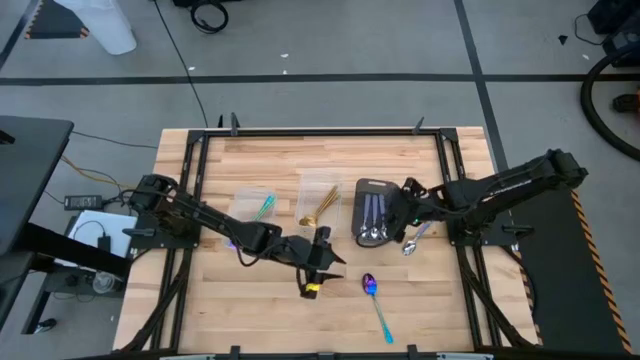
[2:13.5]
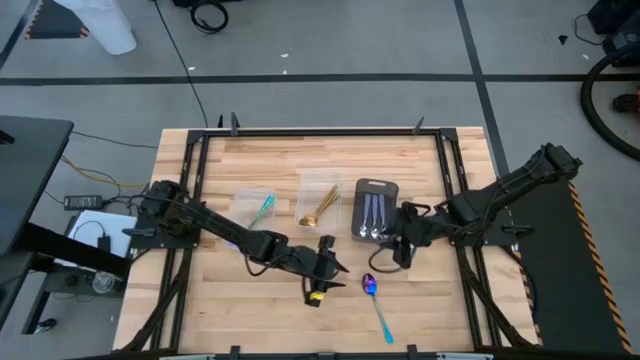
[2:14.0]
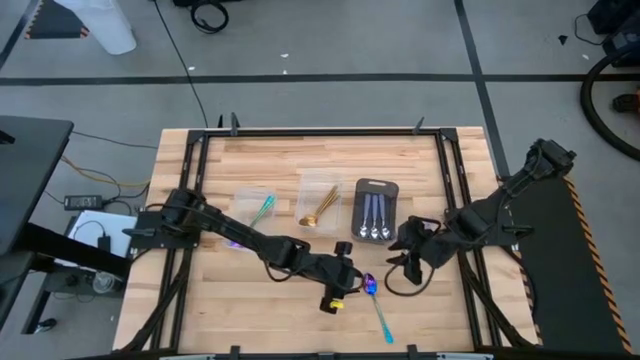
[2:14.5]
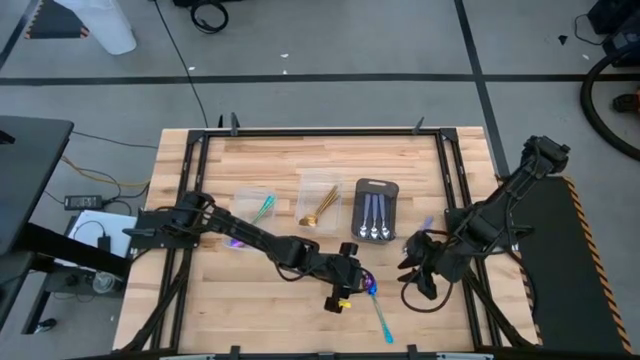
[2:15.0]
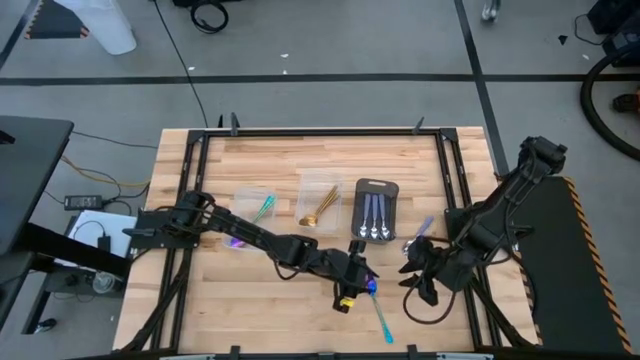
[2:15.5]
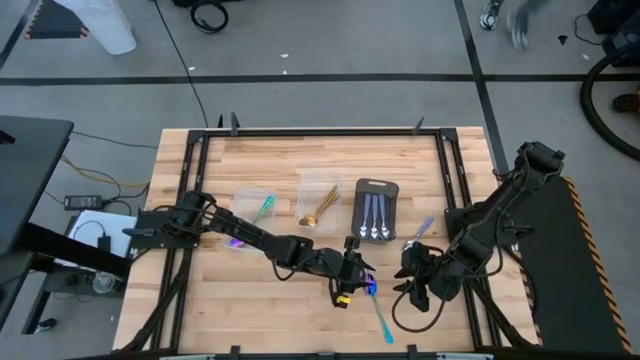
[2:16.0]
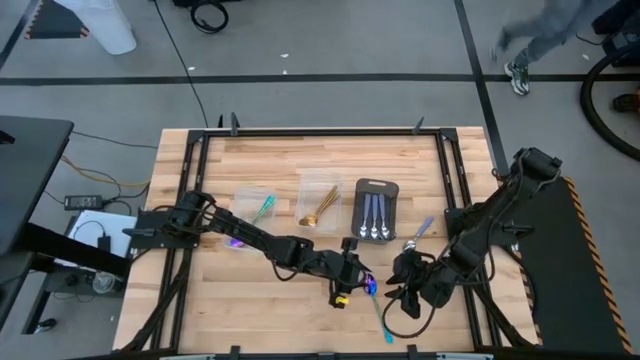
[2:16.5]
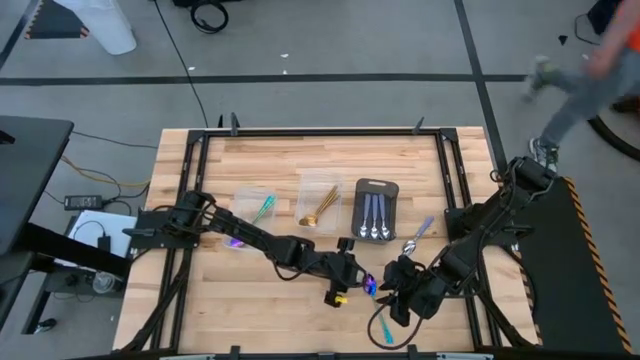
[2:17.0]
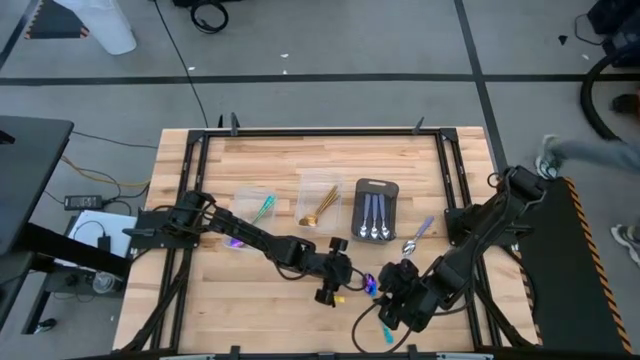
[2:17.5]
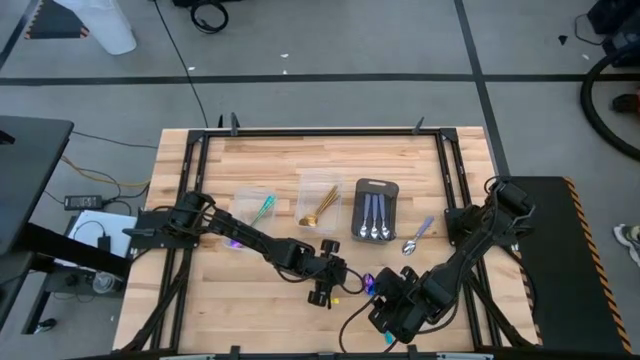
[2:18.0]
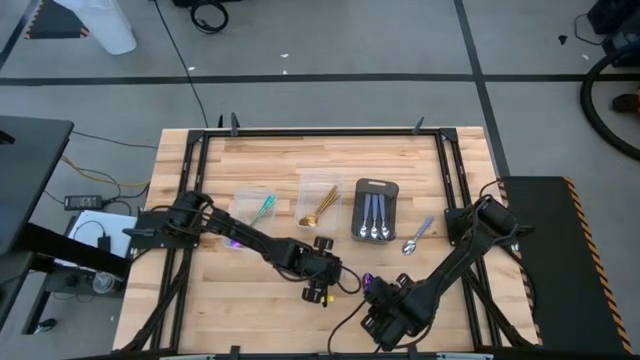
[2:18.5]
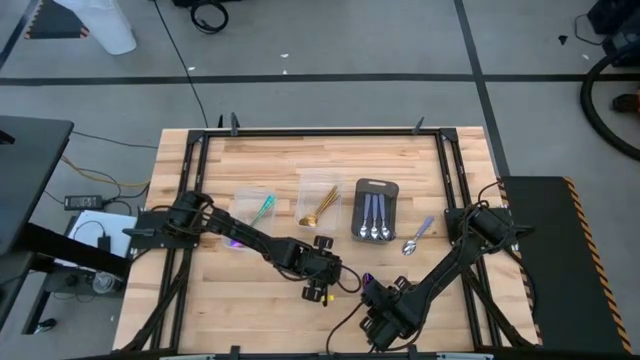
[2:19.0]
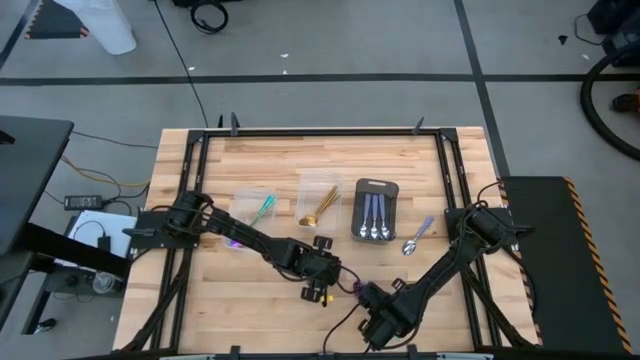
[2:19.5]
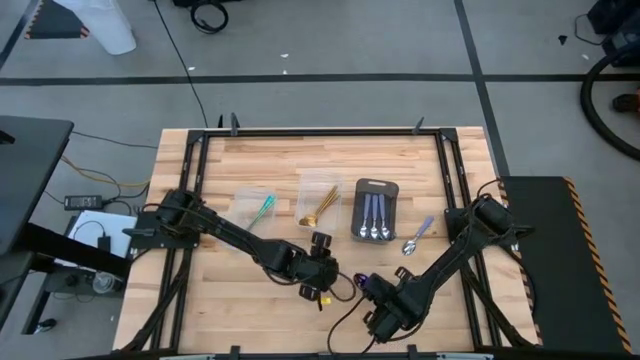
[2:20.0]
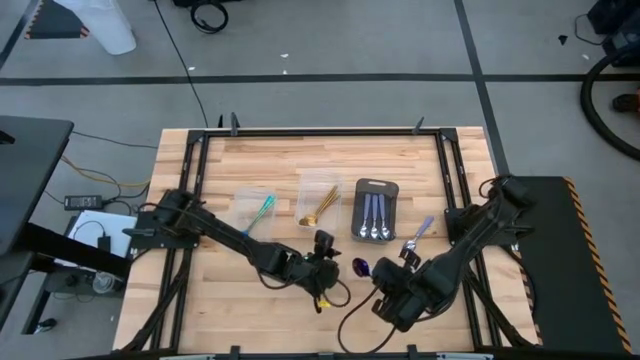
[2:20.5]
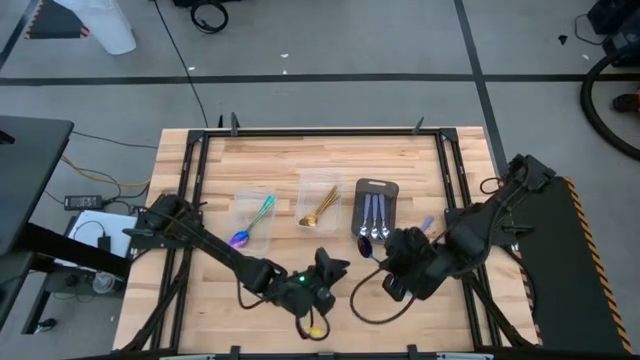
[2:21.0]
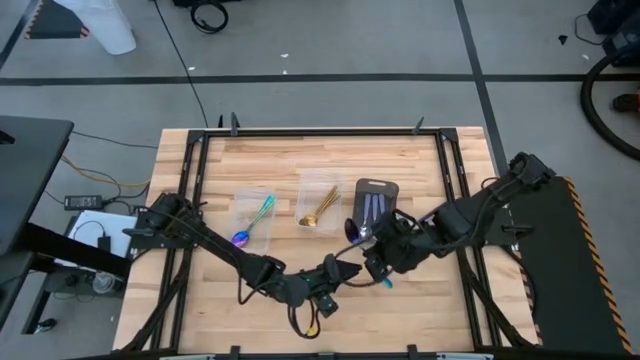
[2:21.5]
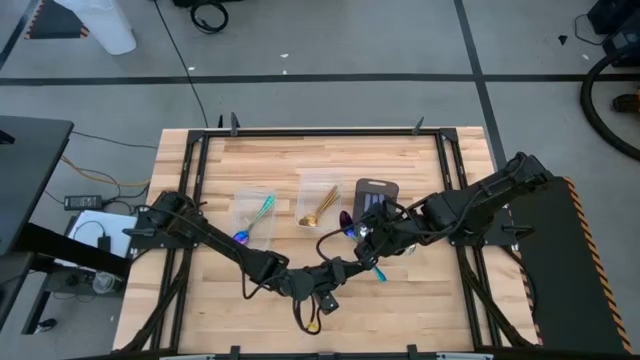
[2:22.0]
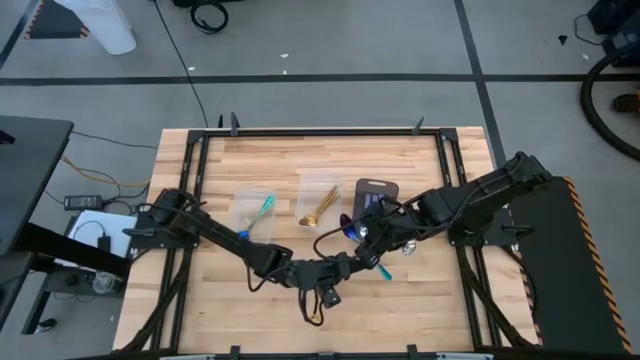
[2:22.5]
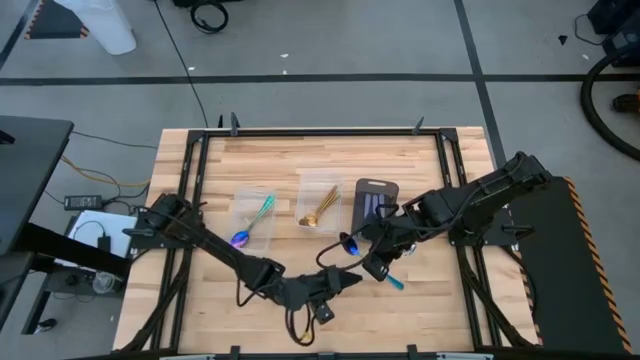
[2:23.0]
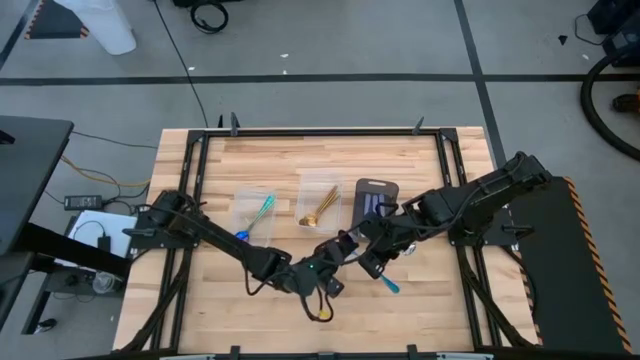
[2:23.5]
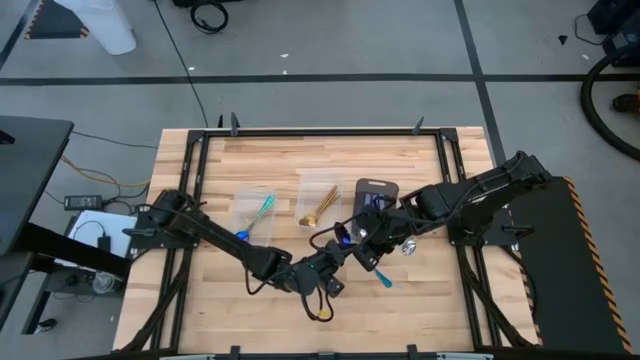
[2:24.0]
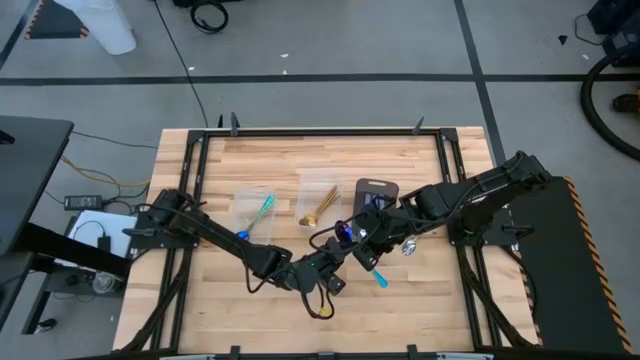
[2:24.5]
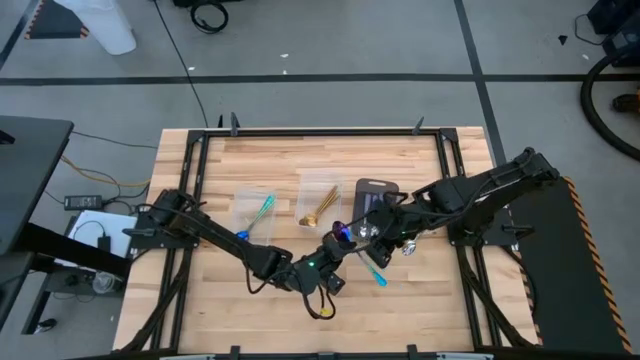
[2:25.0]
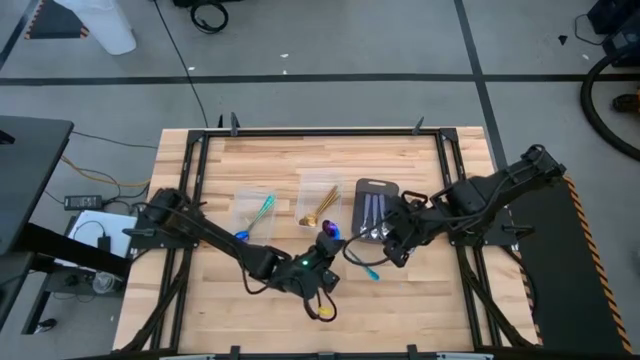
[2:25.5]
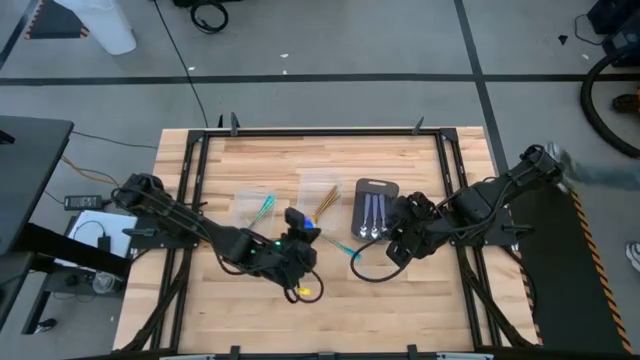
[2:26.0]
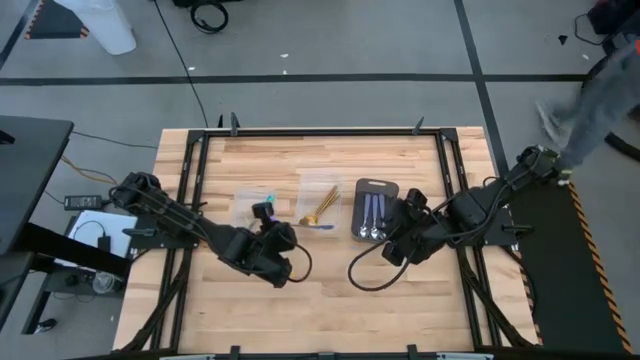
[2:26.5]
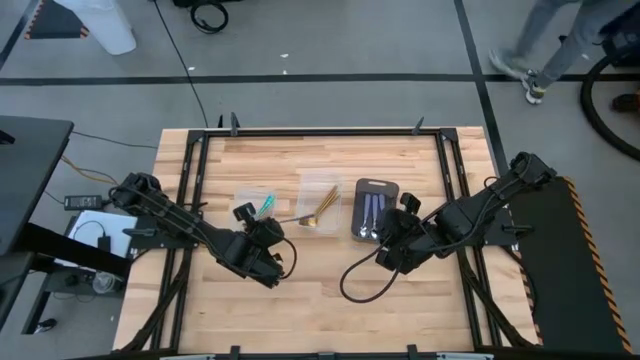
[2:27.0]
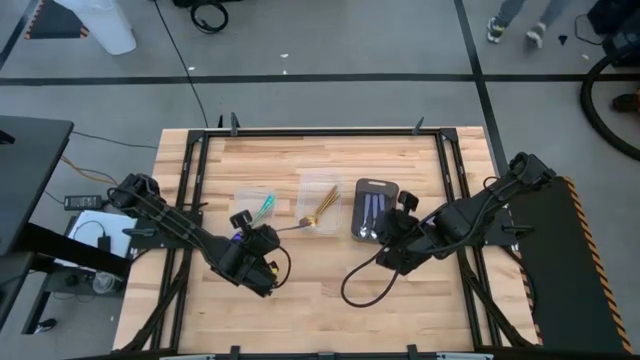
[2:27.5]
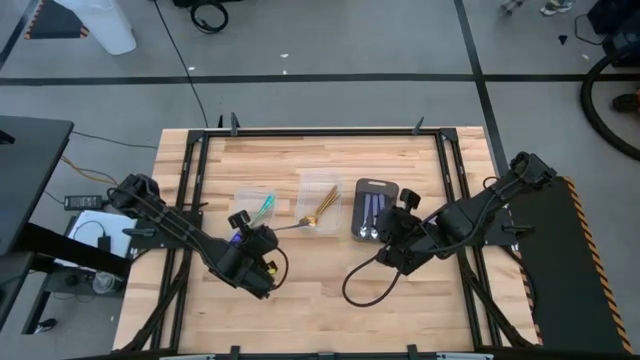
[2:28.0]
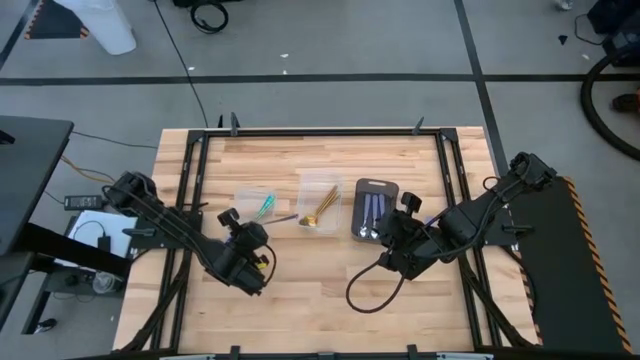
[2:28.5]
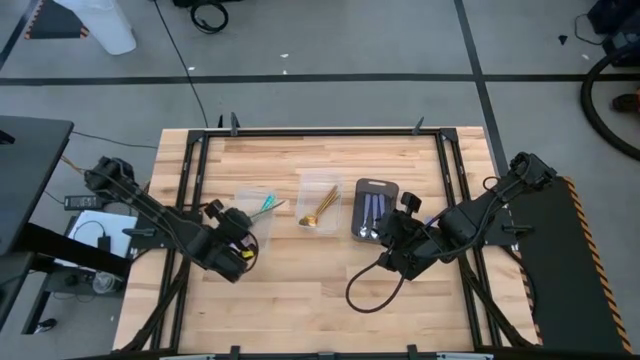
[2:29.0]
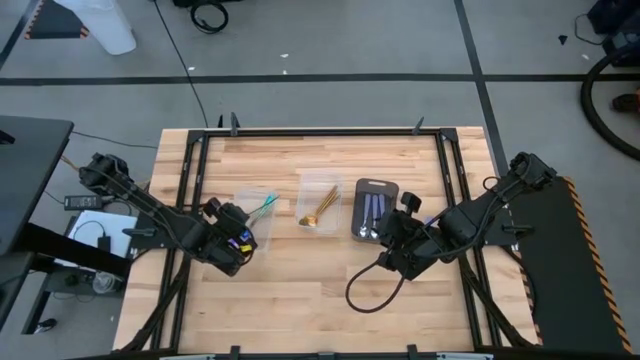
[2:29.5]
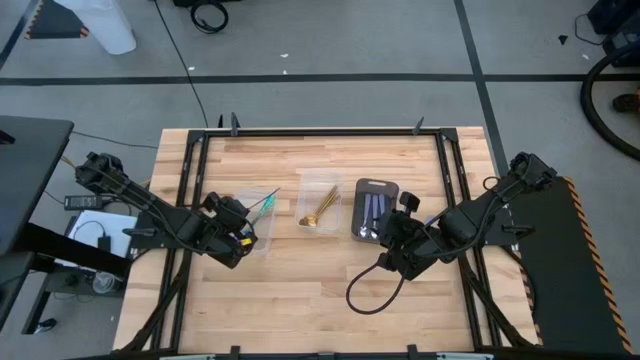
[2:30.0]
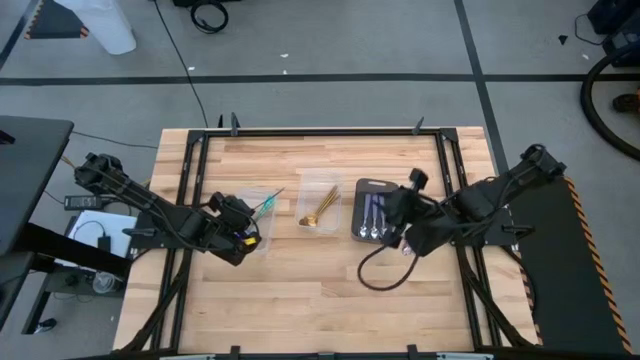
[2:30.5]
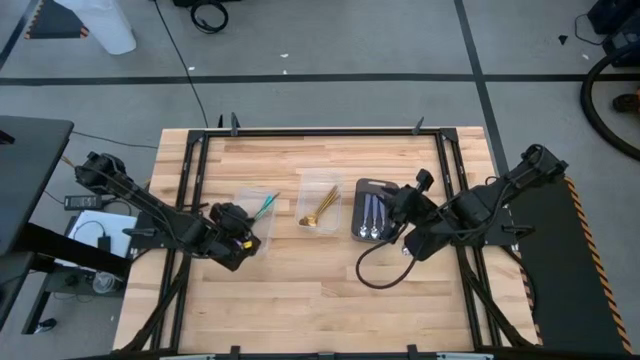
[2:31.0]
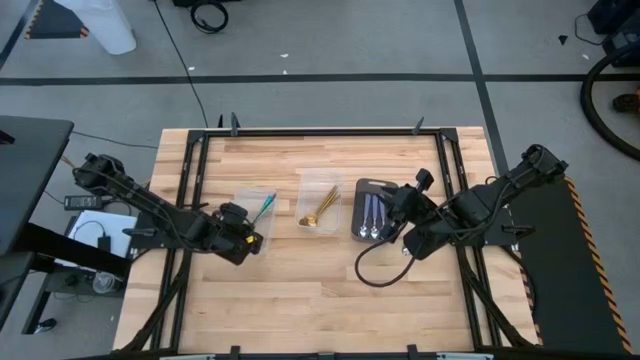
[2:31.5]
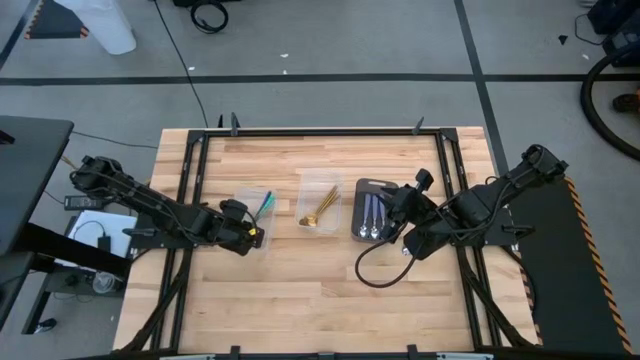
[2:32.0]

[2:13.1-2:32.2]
Task: Sort silverware by color (type)
Put the blue spoon into the left transparent bin

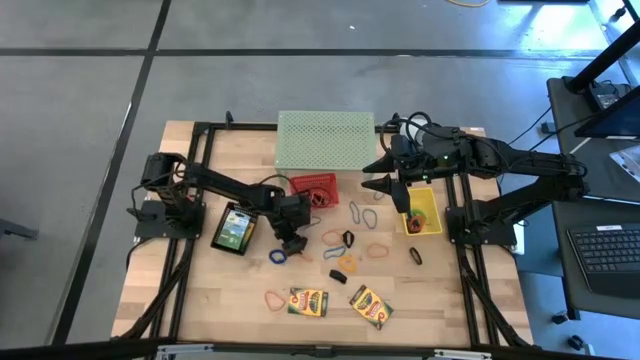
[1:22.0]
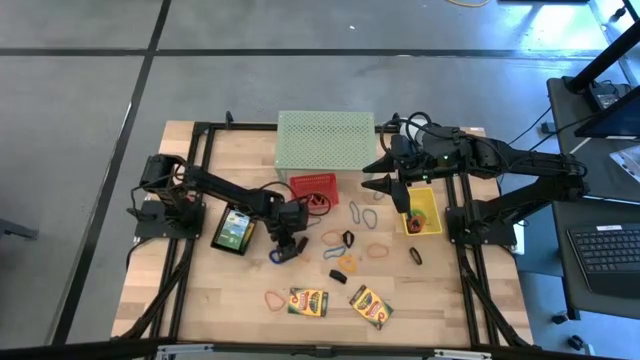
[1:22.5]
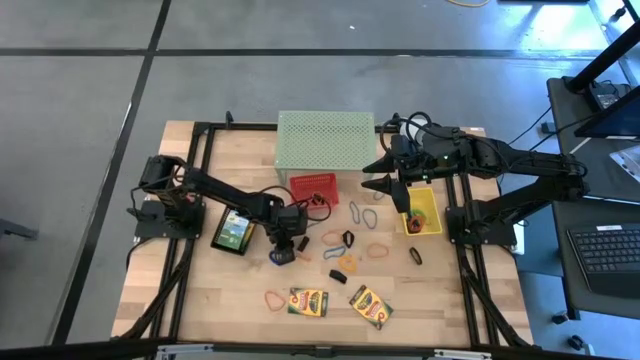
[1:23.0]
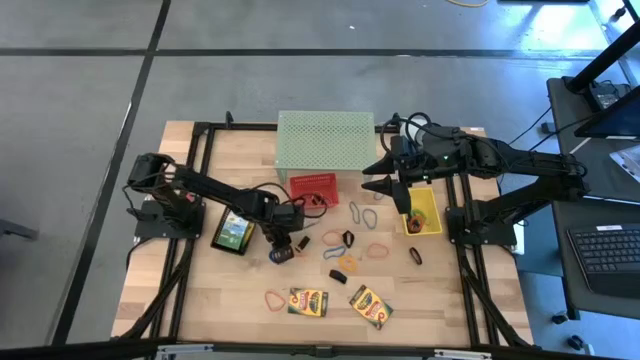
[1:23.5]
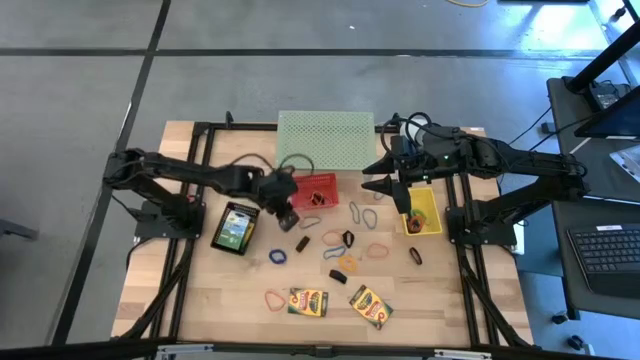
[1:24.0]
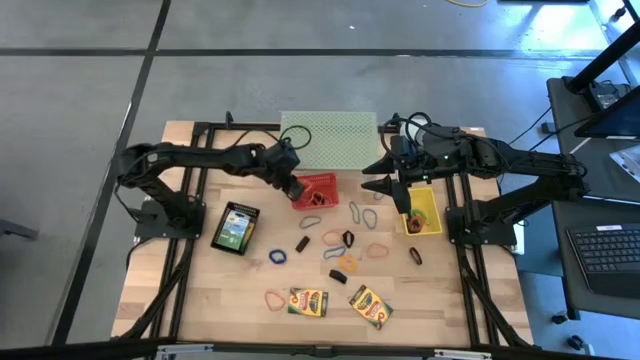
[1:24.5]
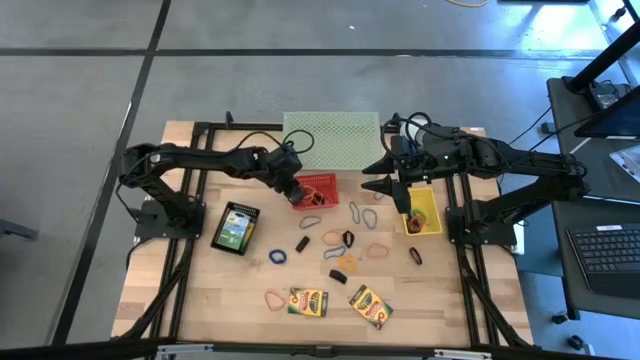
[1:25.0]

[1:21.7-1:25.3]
Task: Pick & Place Office Desk Supplies
Put the orange rubber band into the red bin

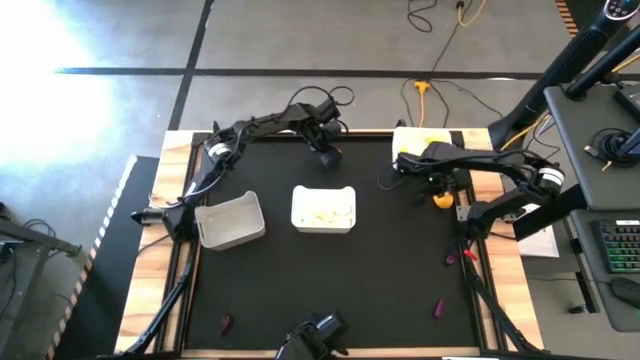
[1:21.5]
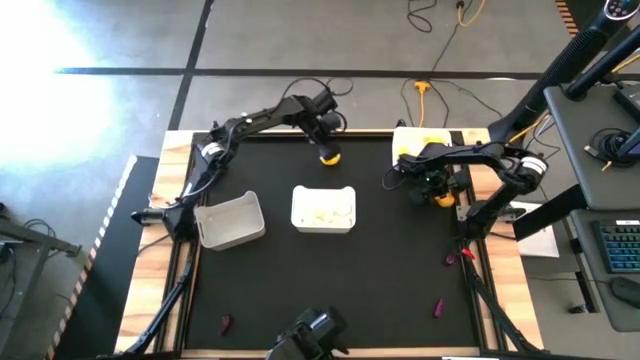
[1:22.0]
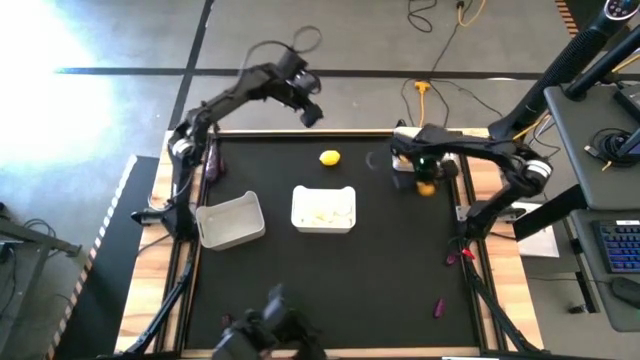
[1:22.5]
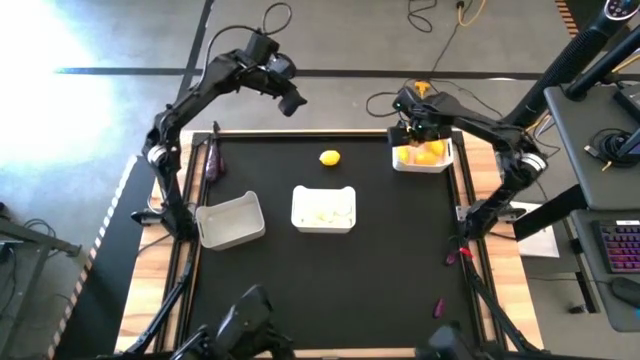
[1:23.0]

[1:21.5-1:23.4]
Task: Sort produce into baskets
Put the yellow lemon into the top white bin
